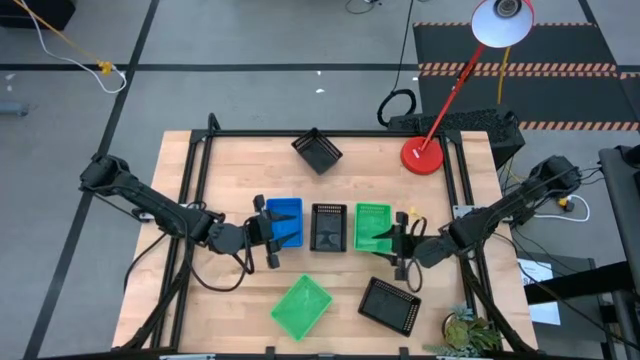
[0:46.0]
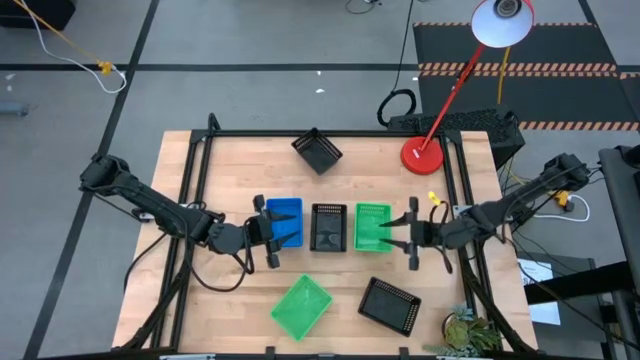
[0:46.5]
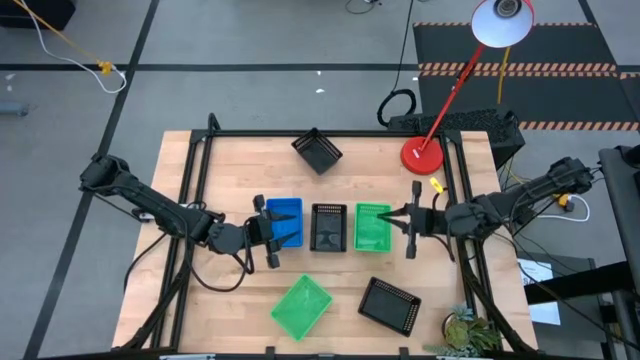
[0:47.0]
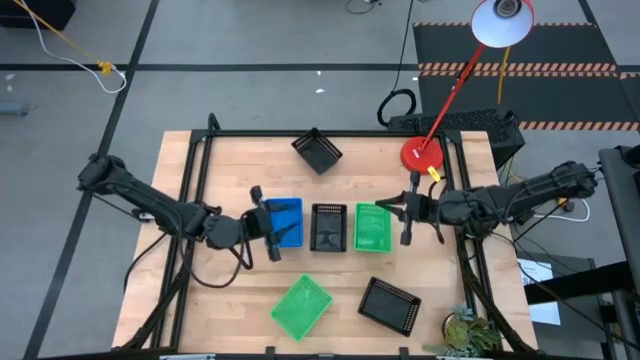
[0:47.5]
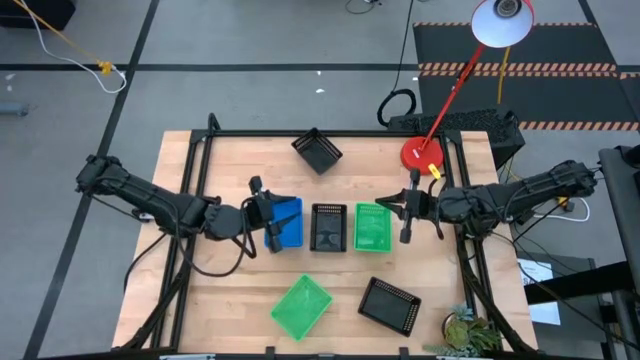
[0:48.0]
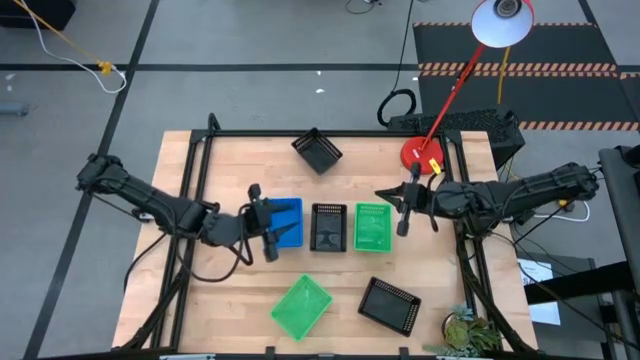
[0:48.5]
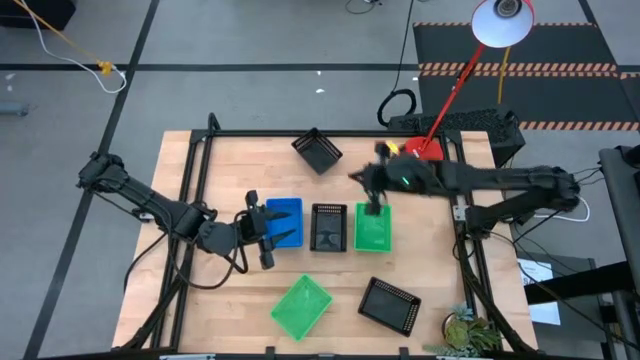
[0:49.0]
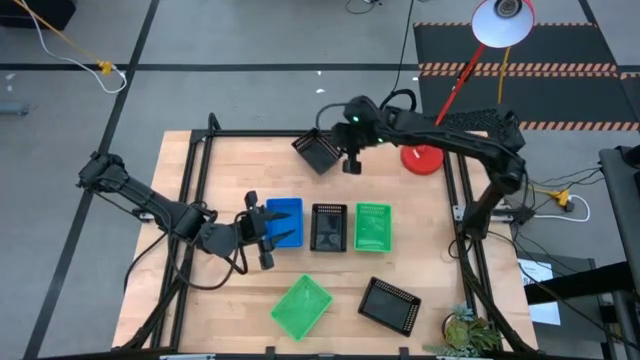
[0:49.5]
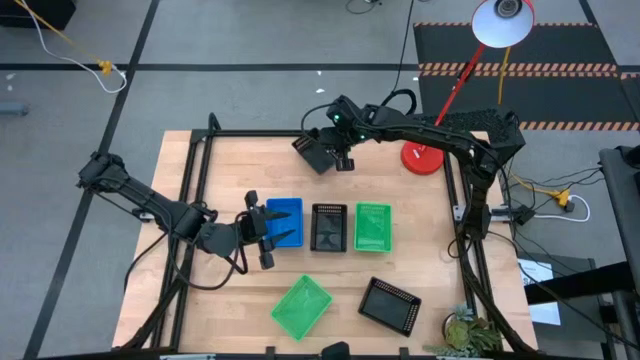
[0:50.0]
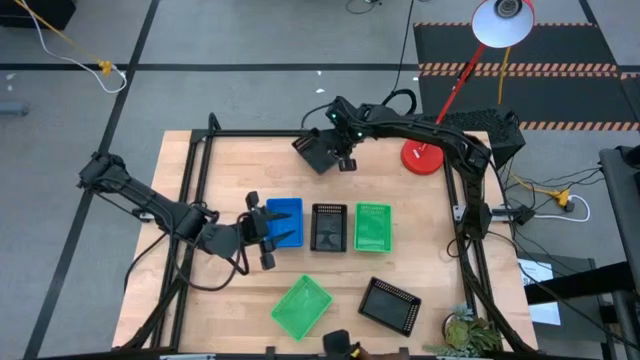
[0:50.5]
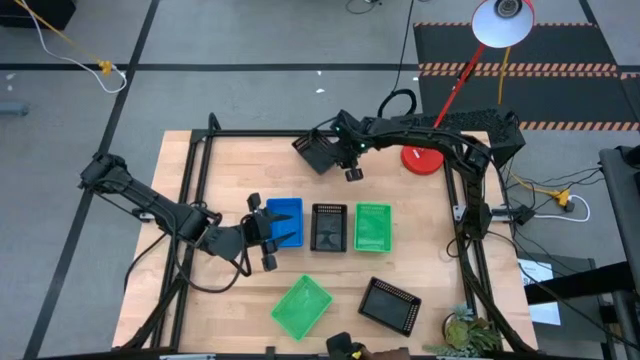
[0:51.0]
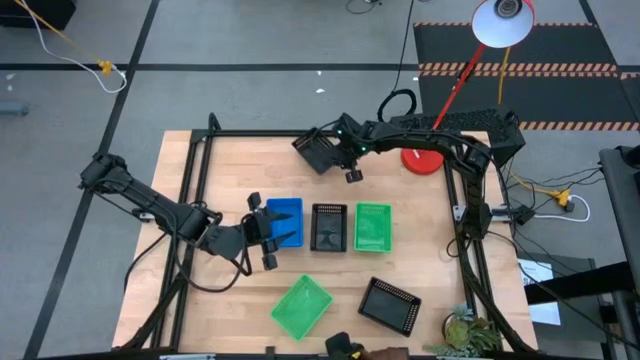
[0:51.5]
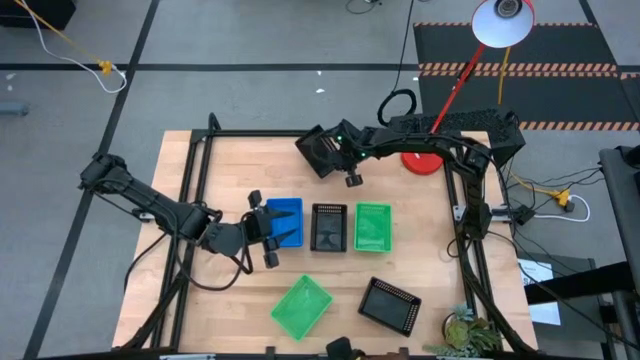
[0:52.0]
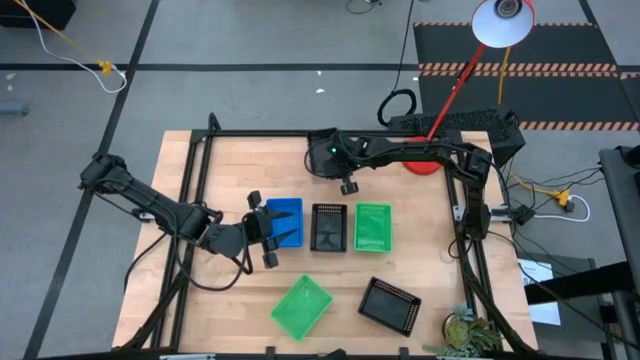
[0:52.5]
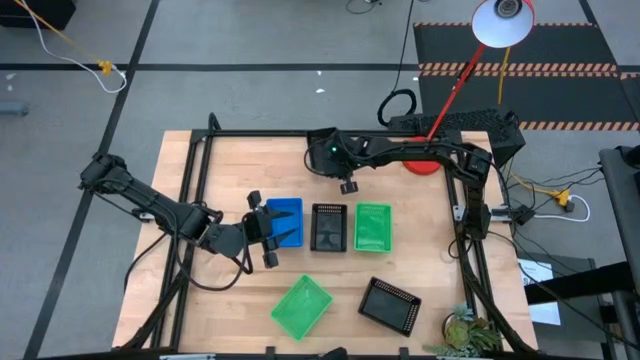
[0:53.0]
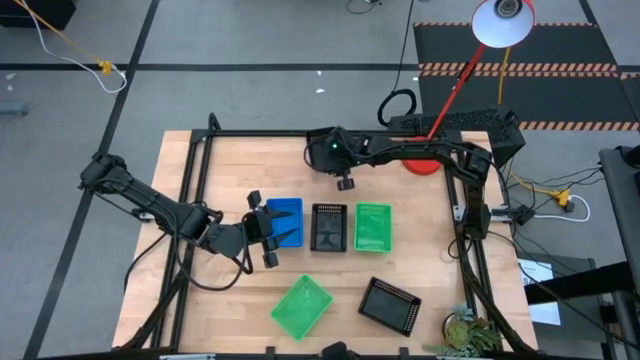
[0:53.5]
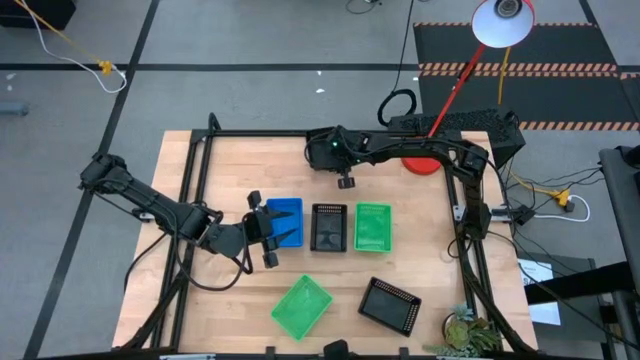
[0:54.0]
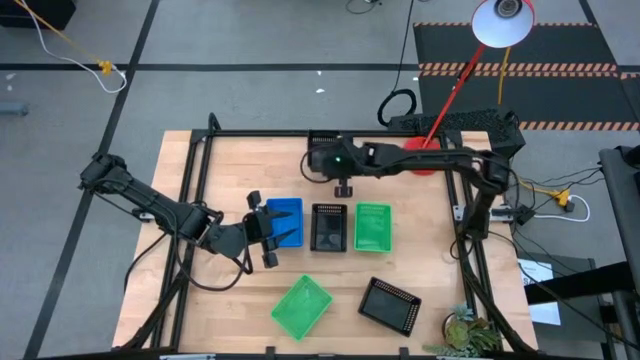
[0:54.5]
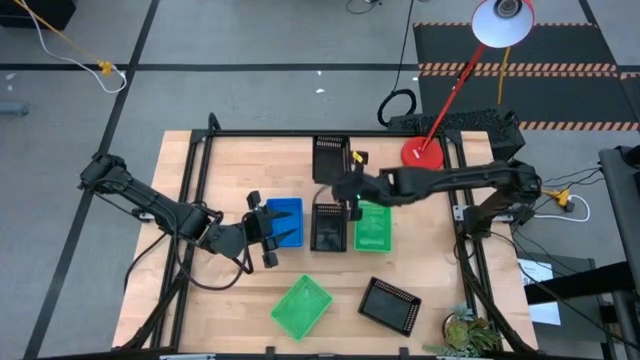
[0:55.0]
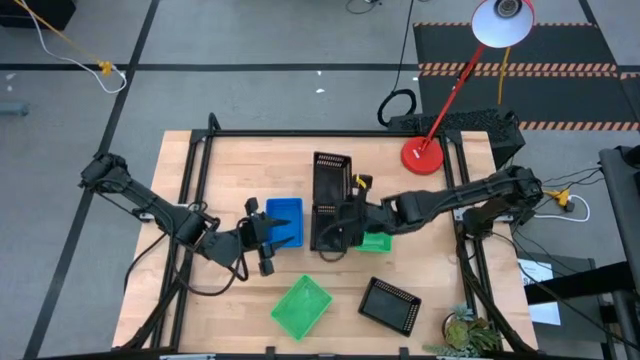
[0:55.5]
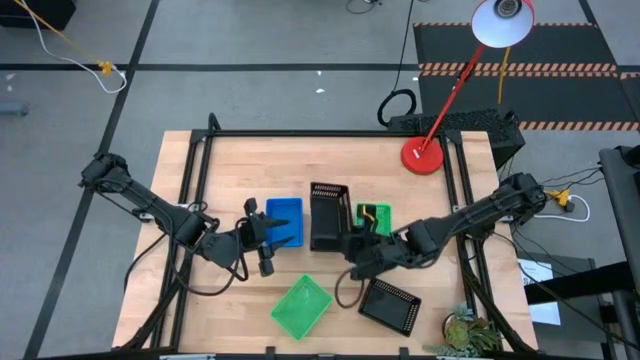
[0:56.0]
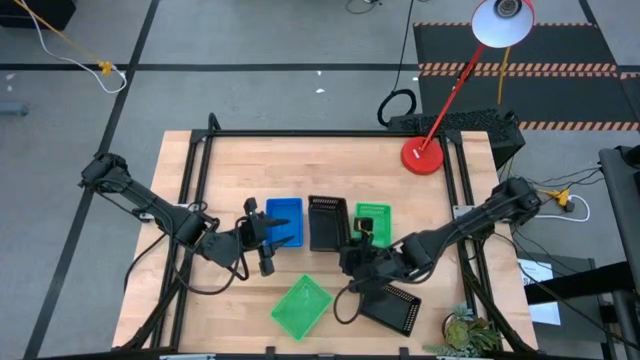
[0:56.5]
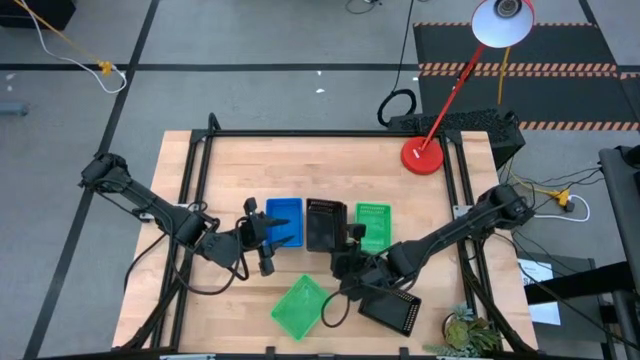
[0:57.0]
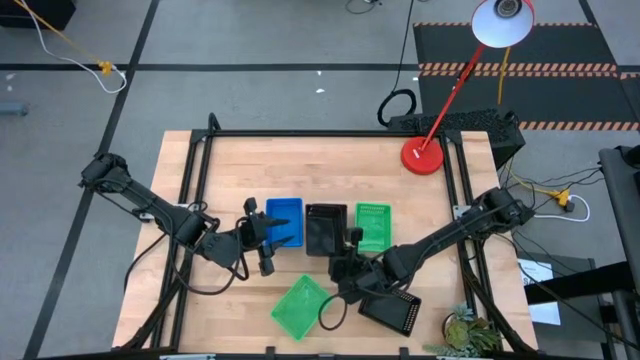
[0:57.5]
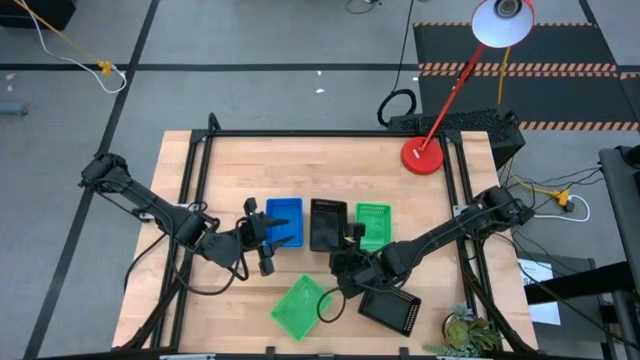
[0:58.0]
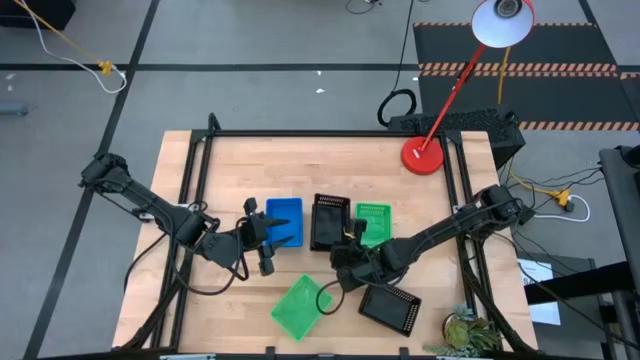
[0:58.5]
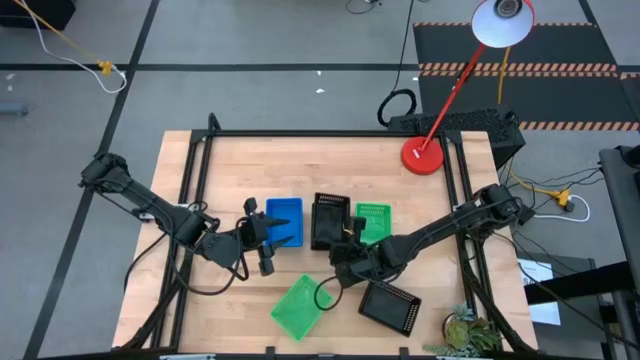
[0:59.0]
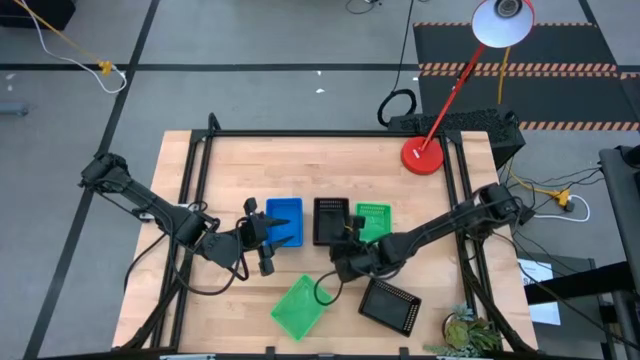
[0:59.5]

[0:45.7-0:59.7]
Stack the top black bin on the middle black bin

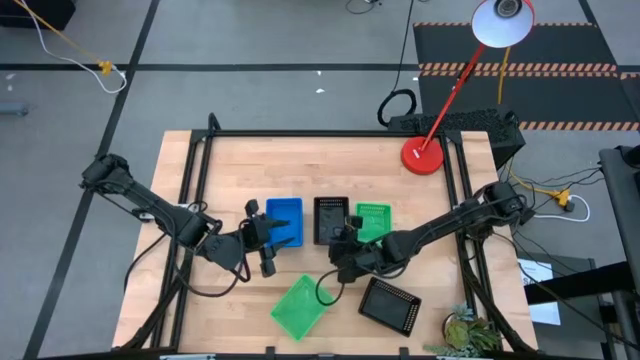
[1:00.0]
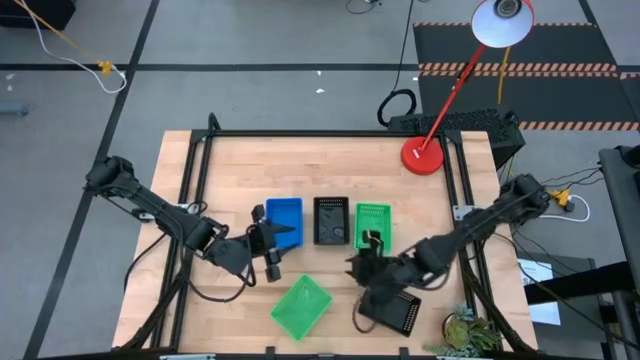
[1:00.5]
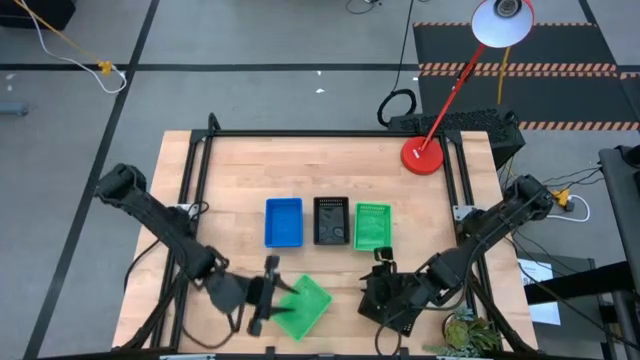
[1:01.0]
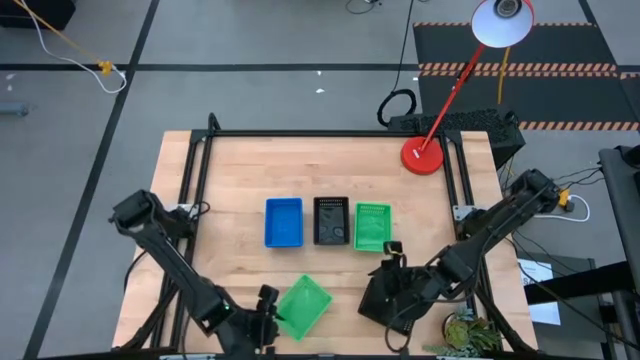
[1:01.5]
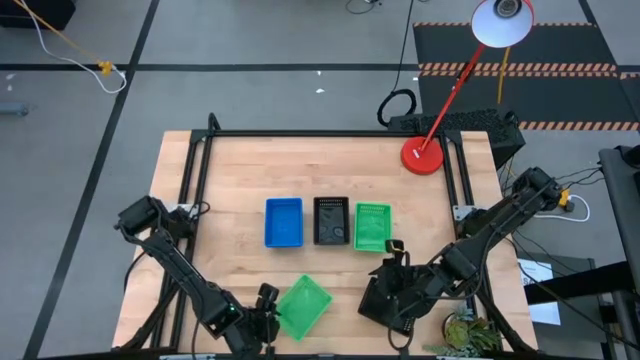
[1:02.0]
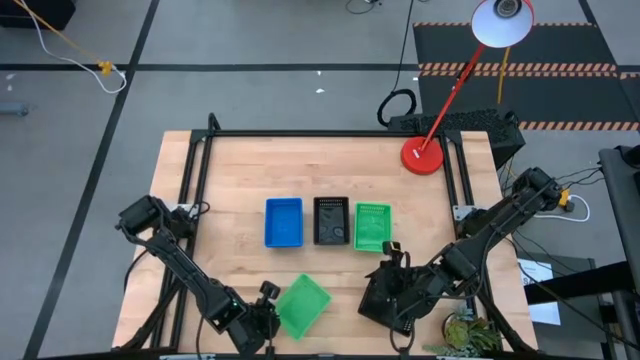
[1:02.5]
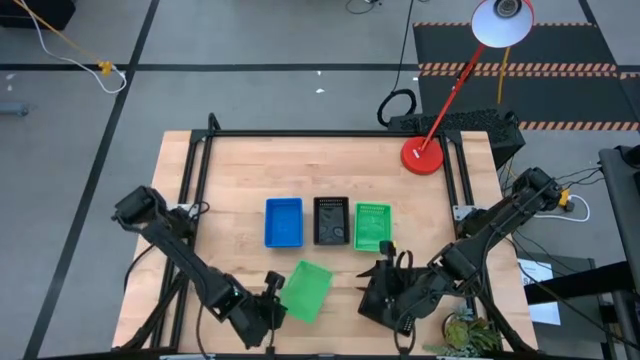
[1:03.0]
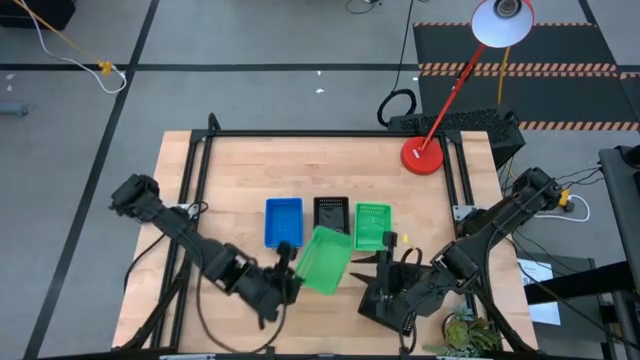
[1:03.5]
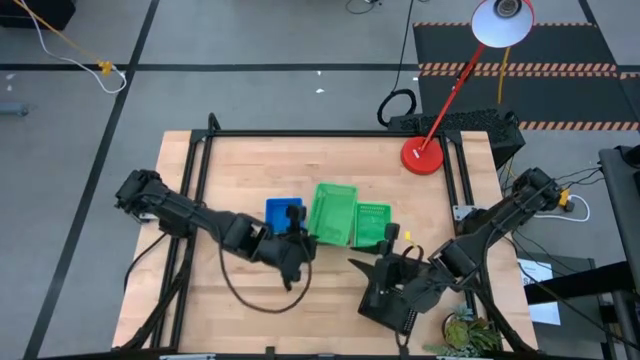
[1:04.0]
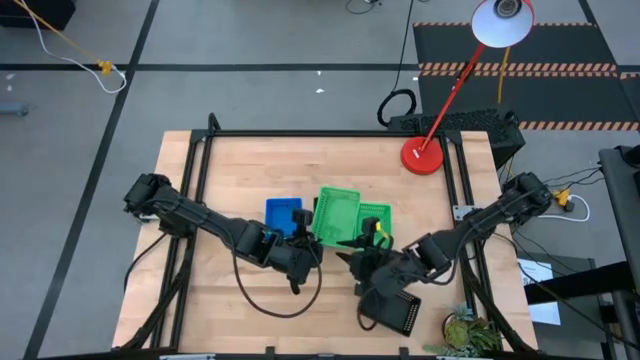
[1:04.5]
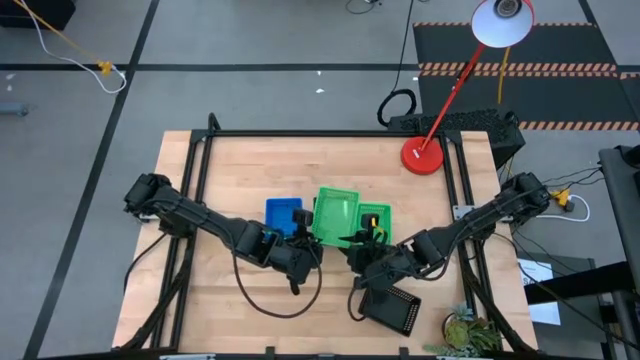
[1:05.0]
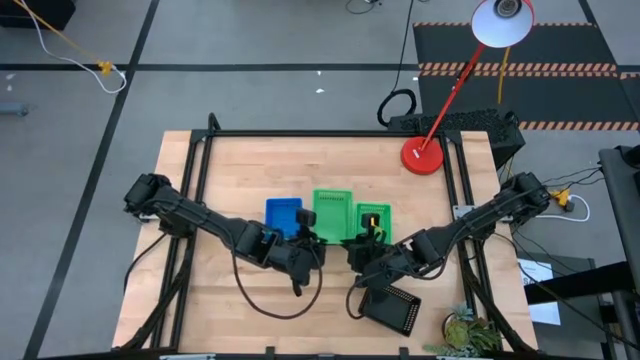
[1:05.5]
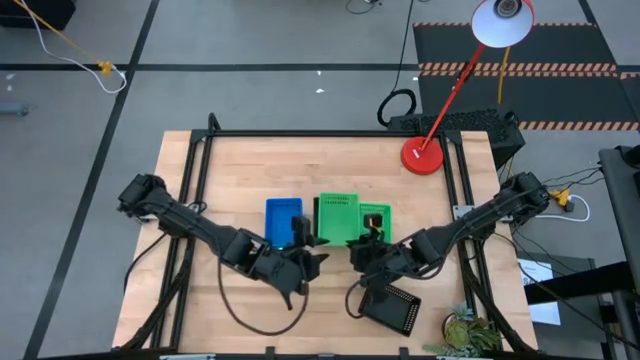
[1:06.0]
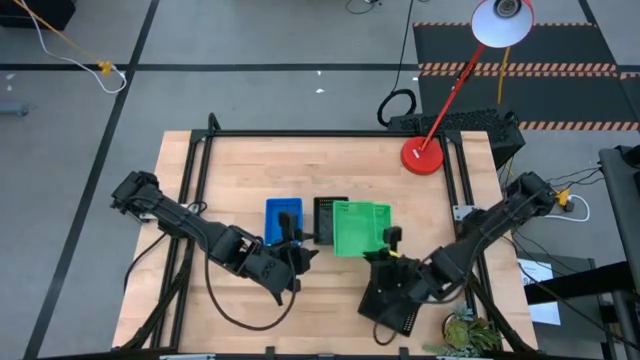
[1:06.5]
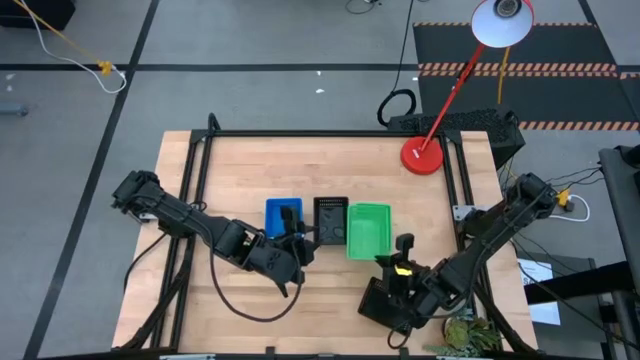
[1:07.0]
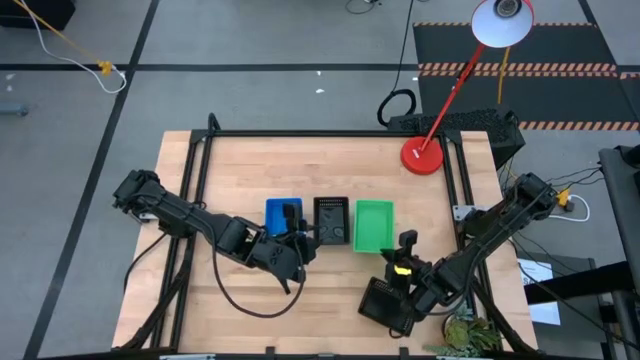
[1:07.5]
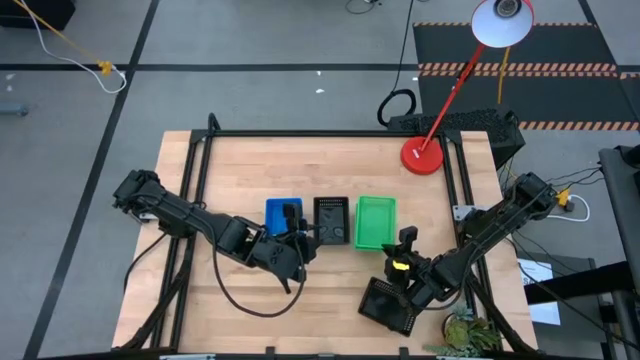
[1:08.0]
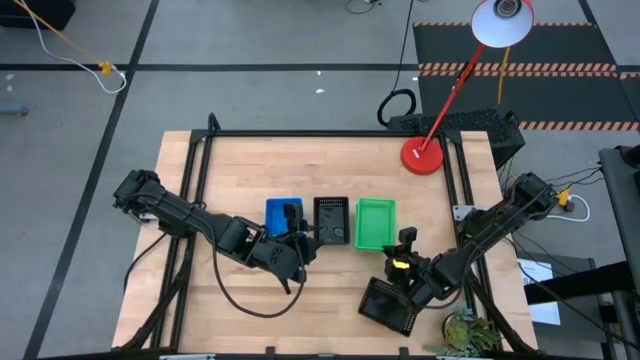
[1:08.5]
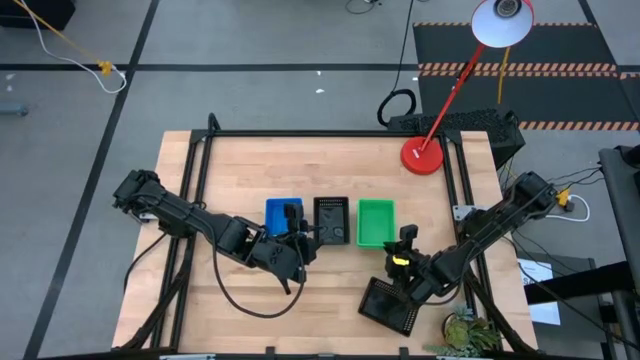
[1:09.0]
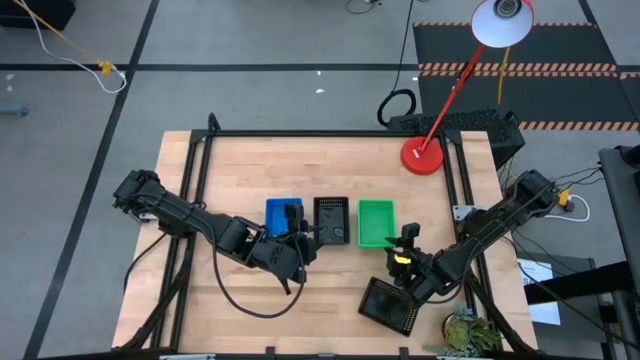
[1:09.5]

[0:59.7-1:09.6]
Stack the bottom green bin on the green bin
